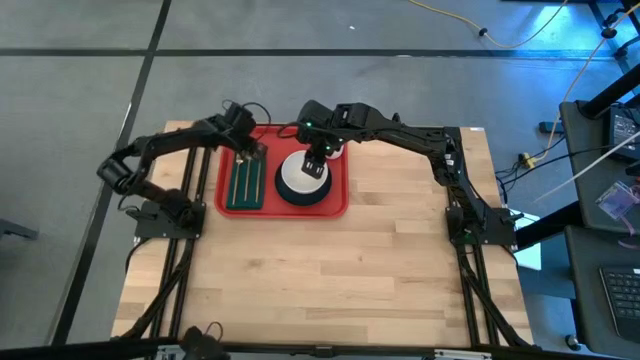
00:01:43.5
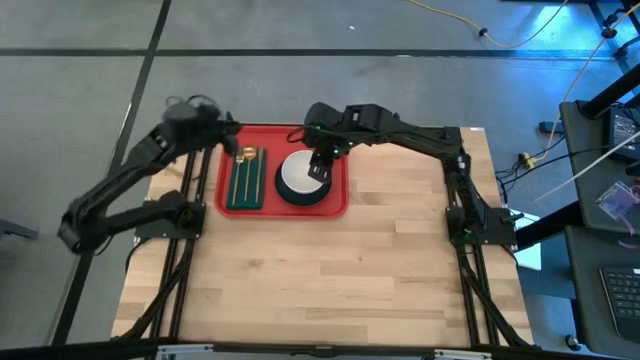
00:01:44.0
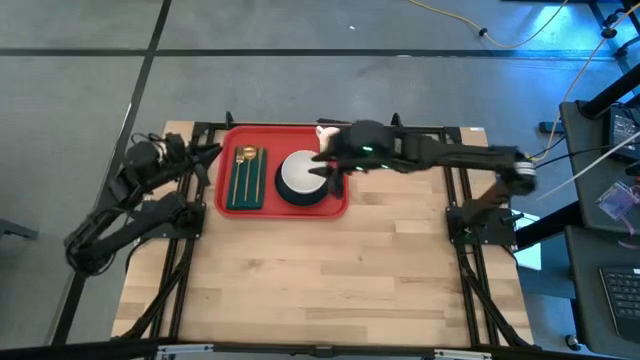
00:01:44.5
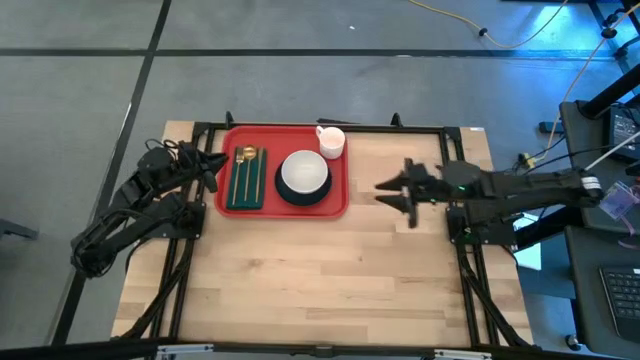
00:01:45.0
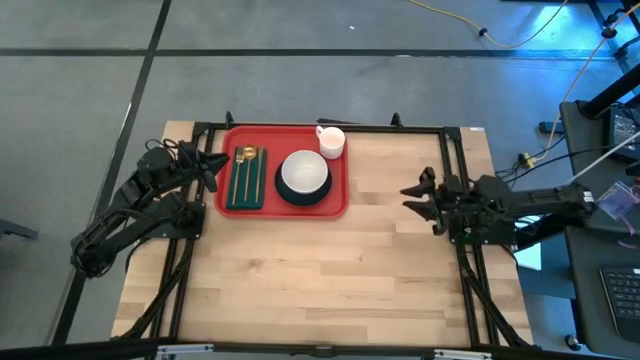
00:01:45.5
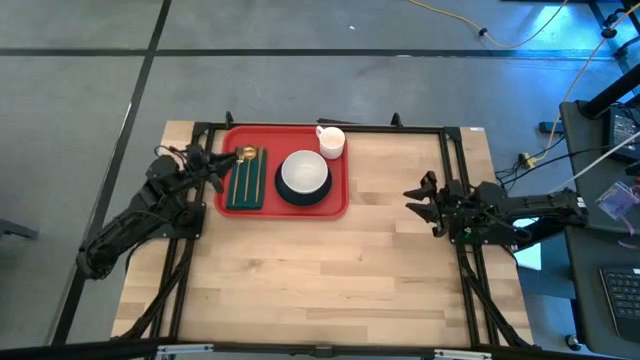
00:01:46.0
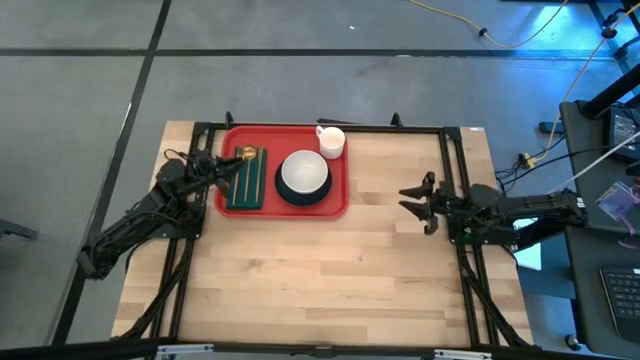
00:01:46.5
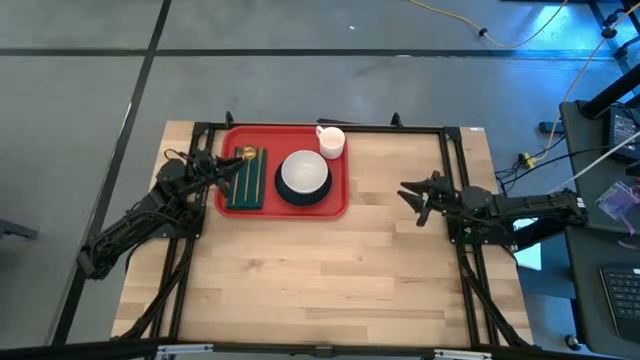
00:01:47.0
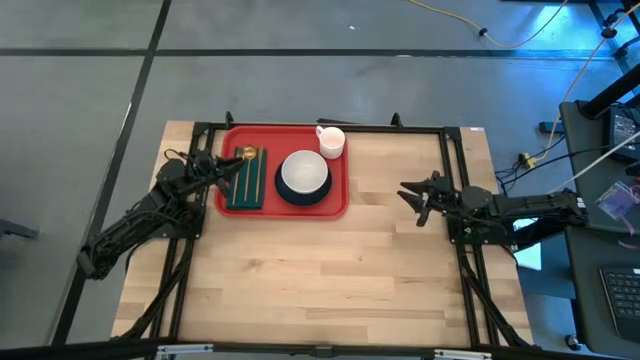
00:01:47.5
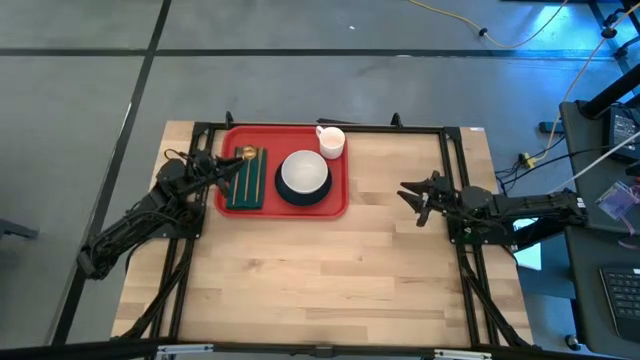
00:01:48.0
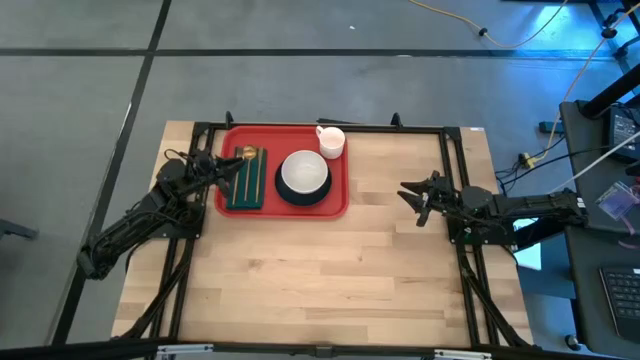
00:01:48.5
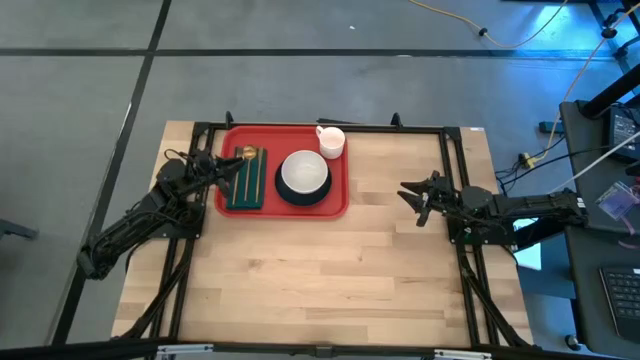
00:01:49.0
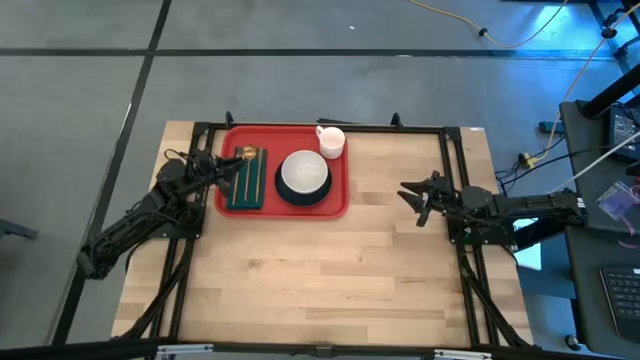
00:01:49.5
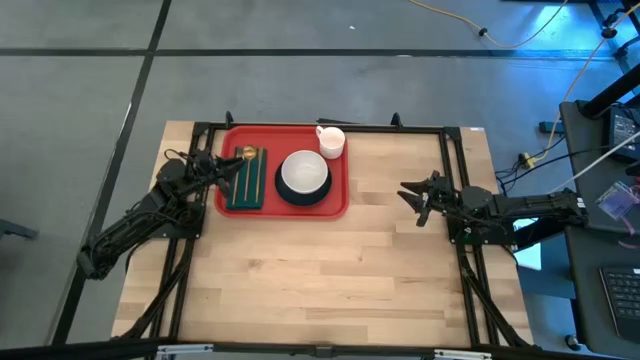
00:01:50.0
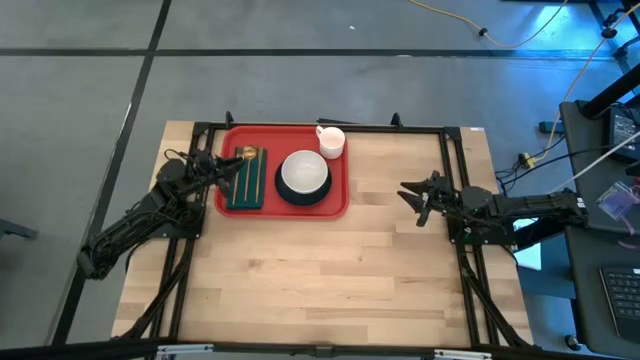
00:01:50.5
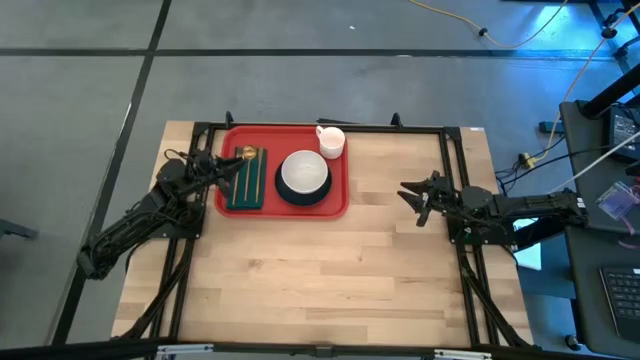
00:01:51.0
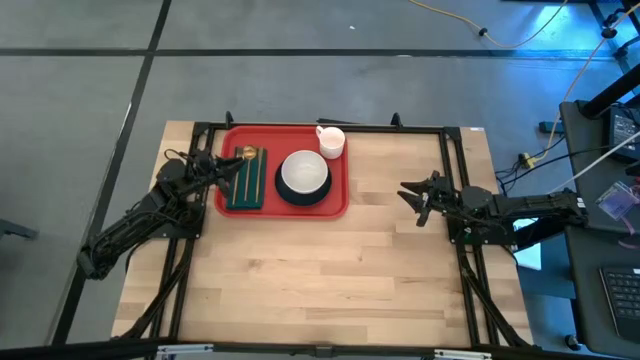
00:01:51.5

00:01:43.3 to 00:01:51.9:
Task: Set up tray
Return to Home Position

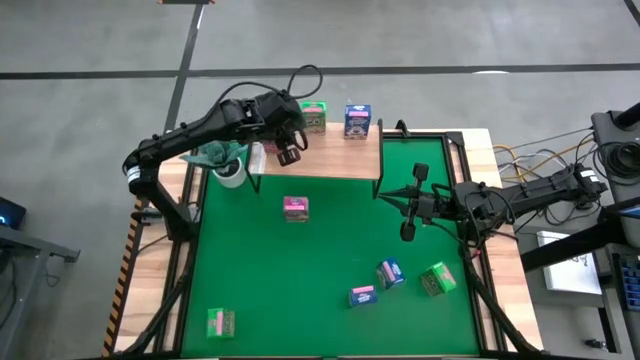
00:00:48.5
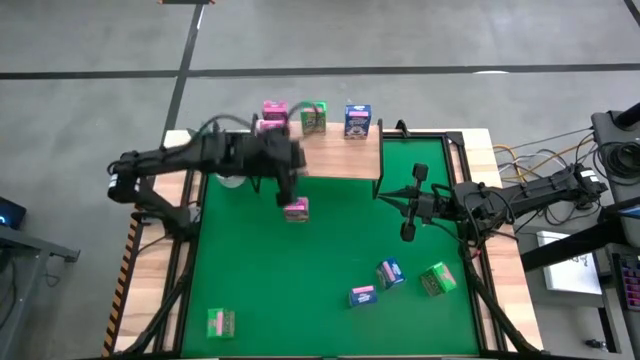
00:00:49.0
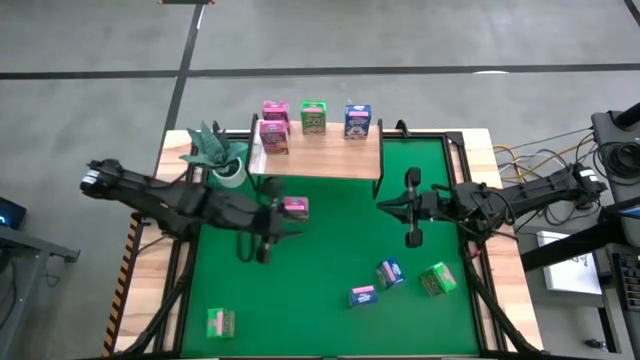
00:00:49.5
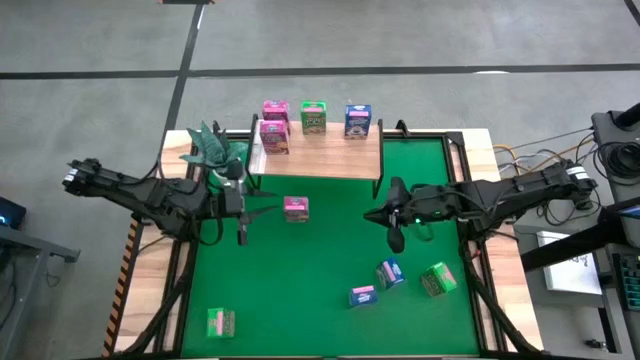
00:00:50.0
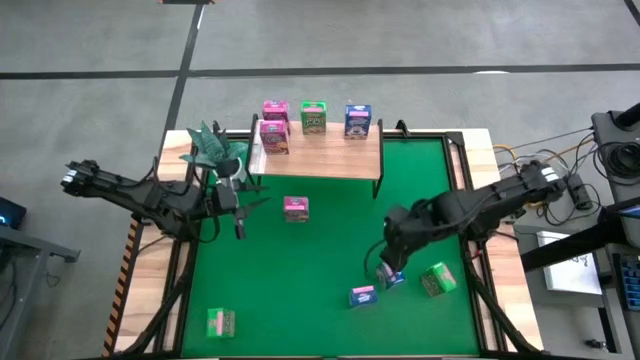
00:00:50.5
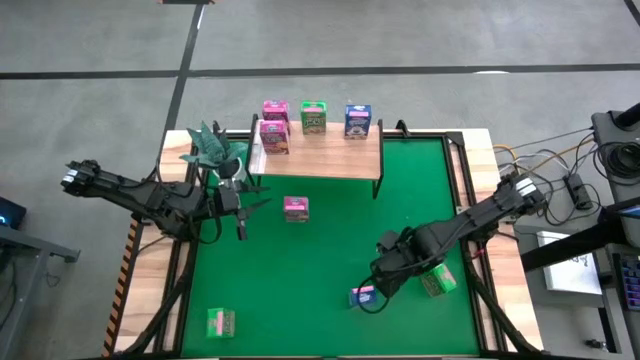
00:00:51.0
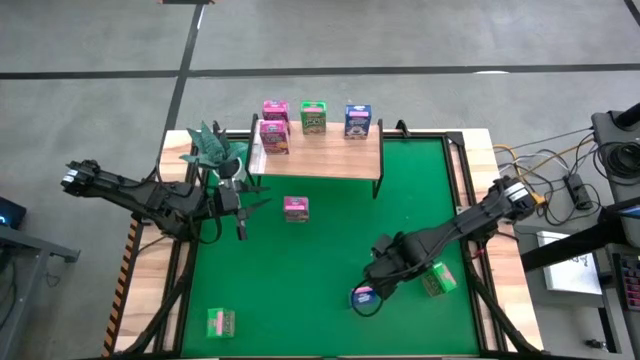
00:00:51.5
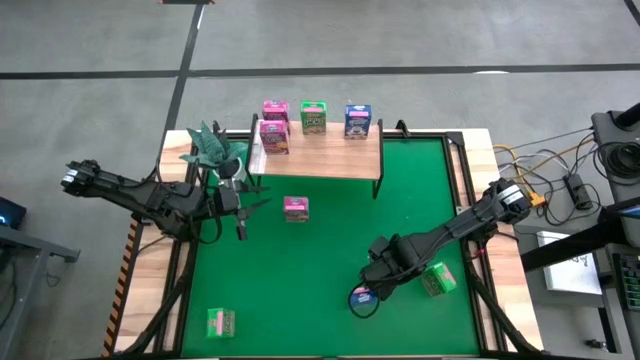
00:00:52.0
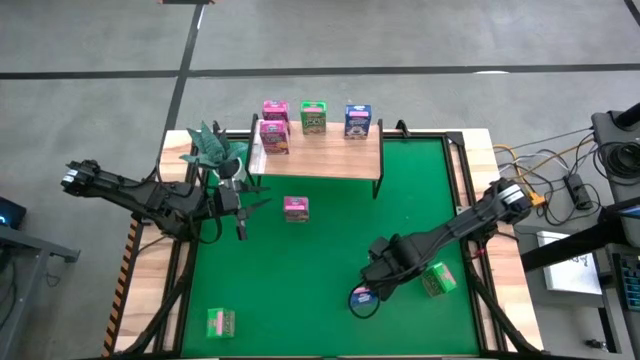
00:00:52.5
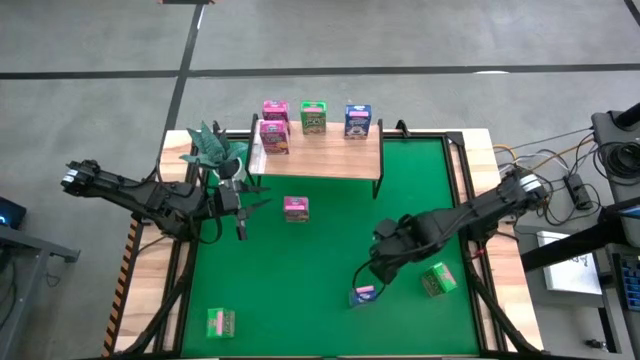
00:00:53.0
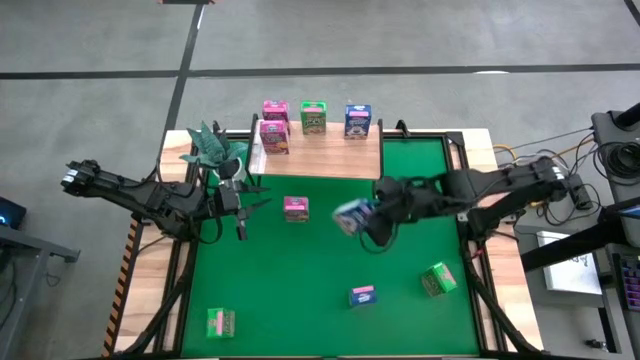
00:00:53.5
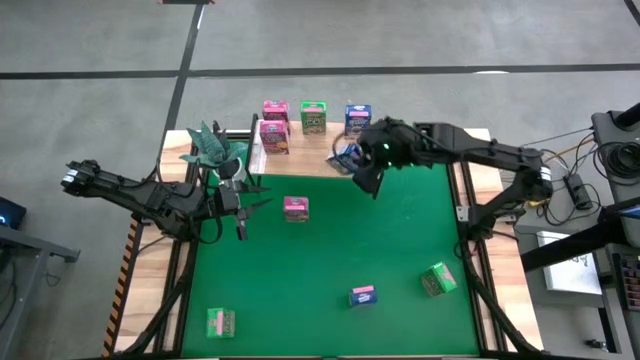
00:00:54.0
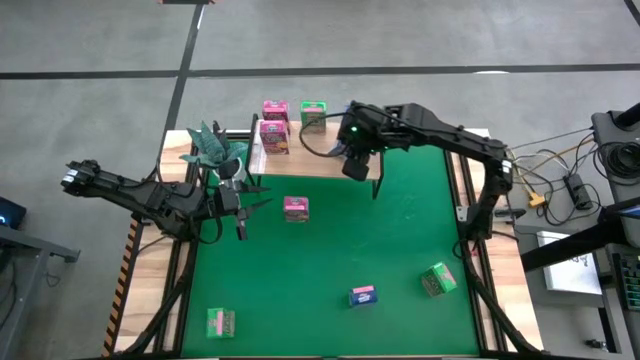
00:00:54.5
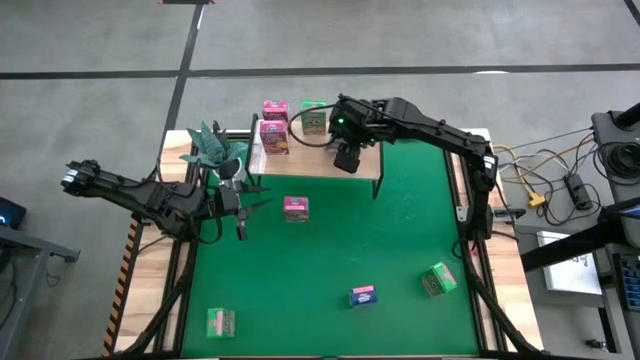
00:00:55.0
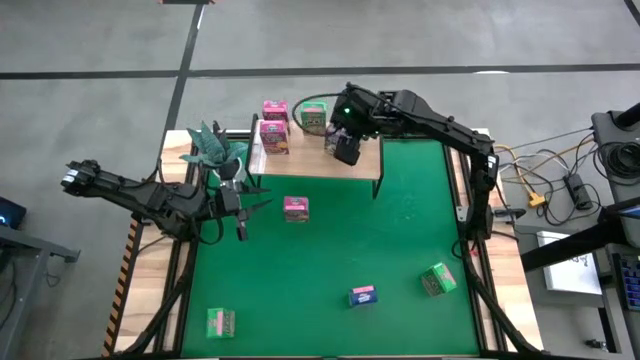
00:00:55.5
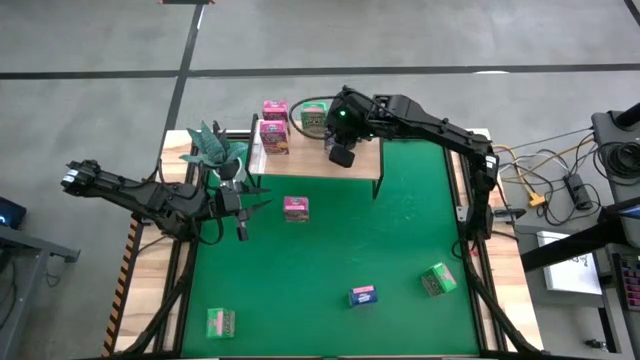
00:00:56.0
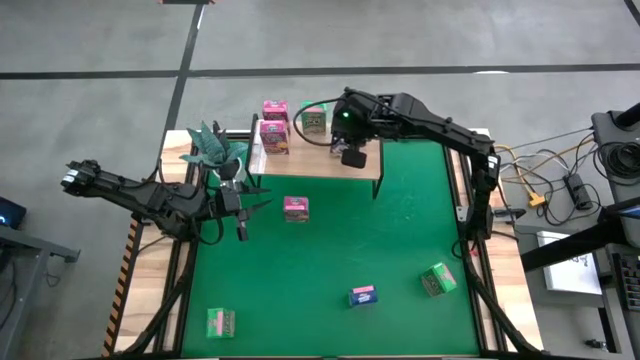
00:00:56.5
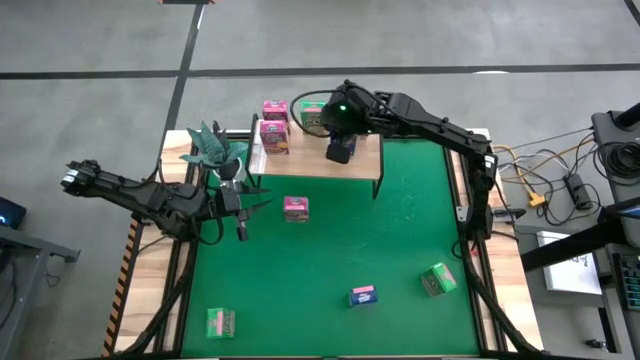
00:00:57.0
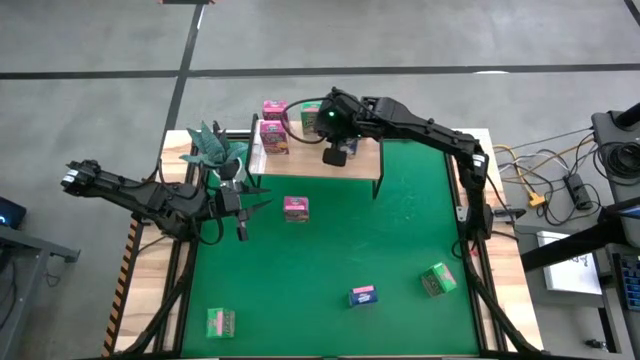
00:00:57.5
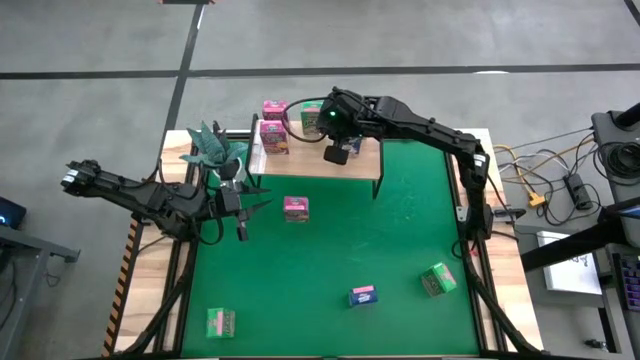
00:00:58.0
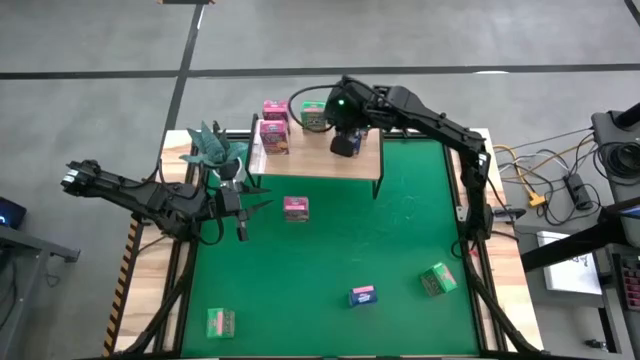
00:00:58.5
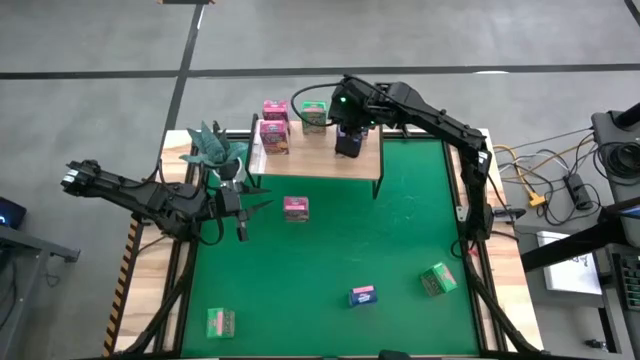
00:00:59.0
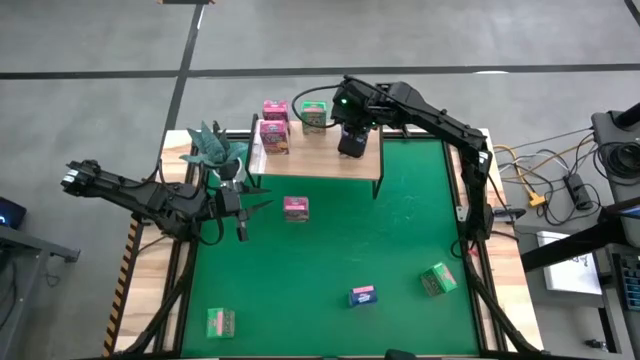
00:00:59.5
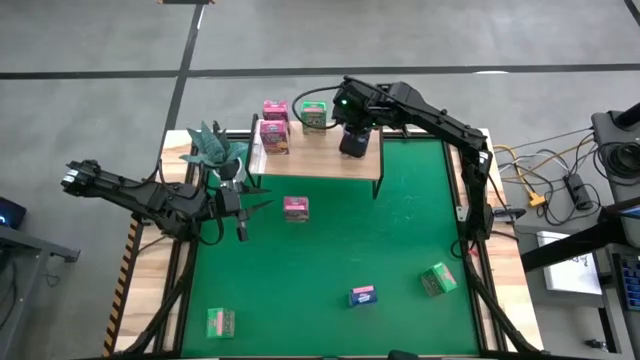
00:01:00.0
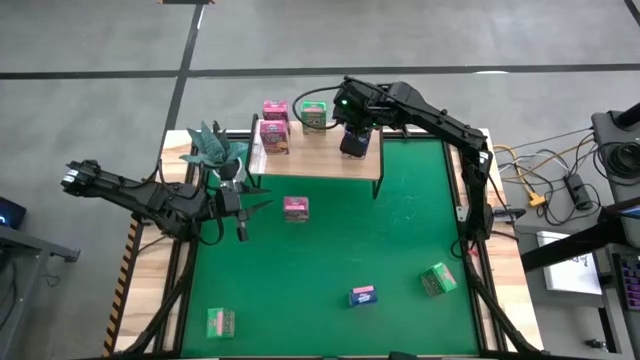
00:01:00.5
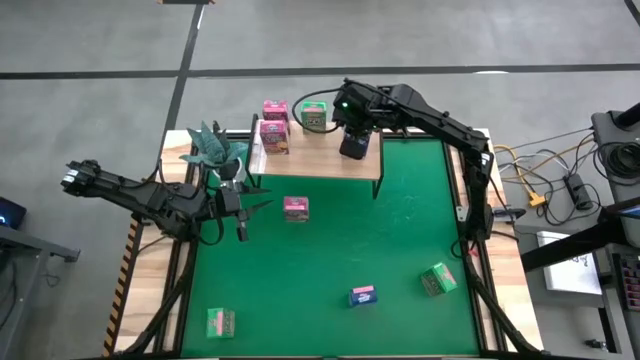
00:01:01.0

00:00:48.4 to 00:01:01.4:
Task: Stack cereal on shelf
Put the right blue cereal box on the shelf aligned with the other blue cereal box
